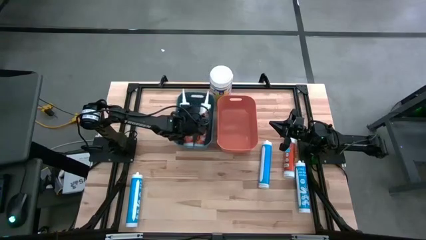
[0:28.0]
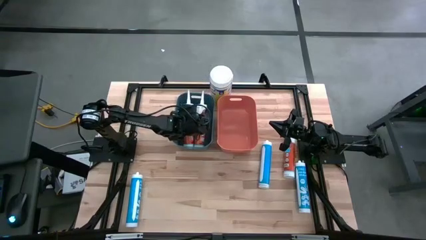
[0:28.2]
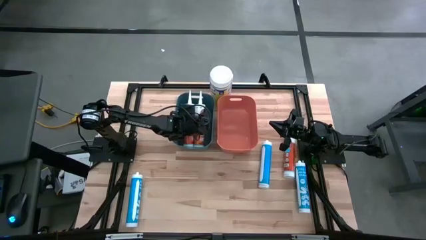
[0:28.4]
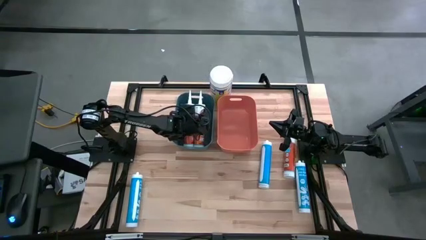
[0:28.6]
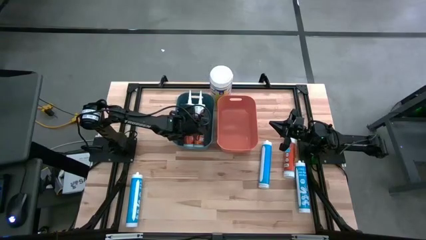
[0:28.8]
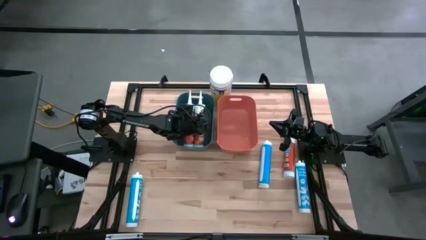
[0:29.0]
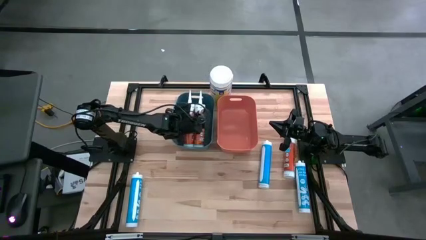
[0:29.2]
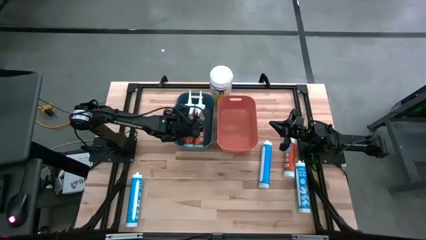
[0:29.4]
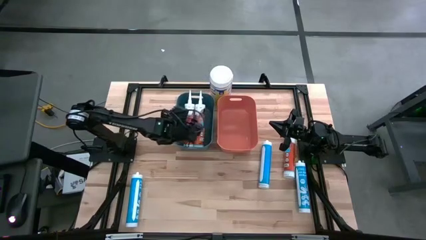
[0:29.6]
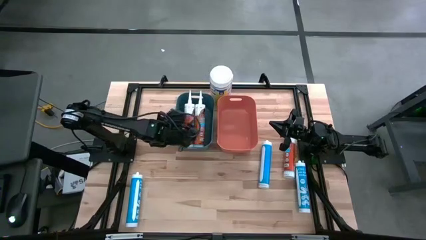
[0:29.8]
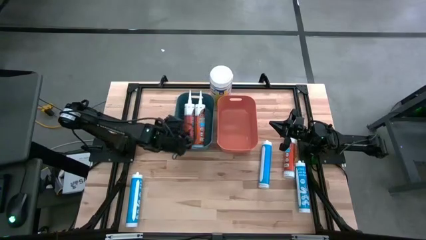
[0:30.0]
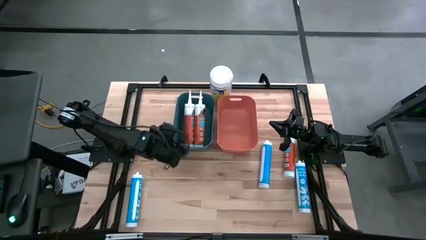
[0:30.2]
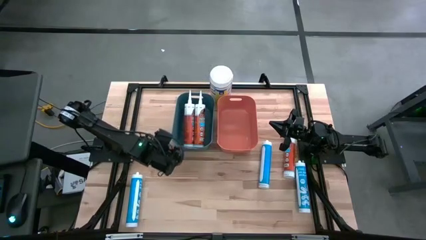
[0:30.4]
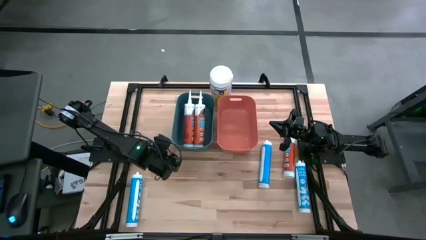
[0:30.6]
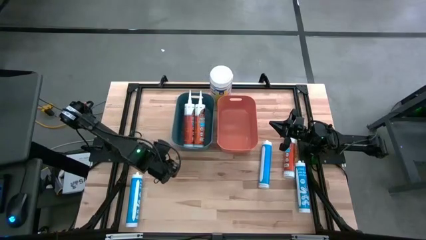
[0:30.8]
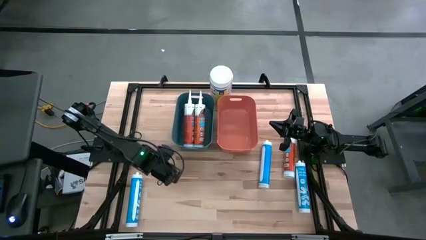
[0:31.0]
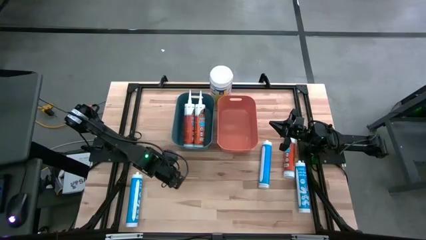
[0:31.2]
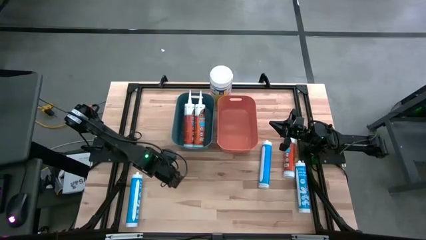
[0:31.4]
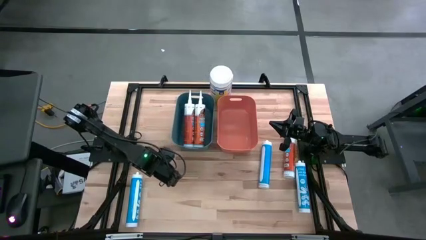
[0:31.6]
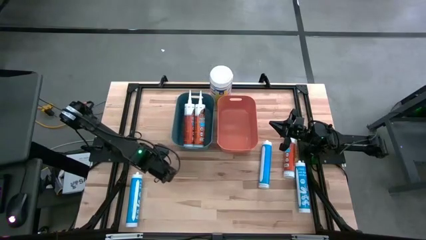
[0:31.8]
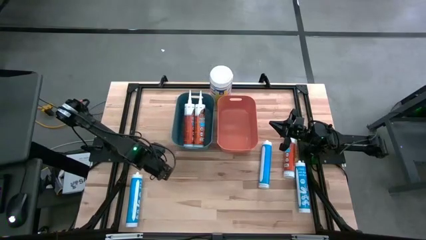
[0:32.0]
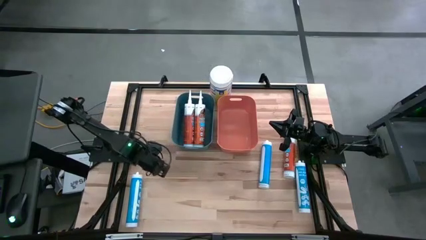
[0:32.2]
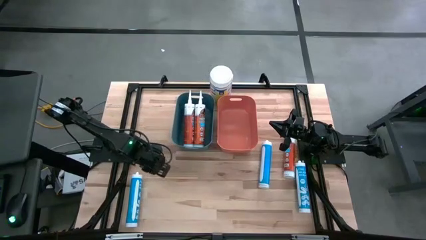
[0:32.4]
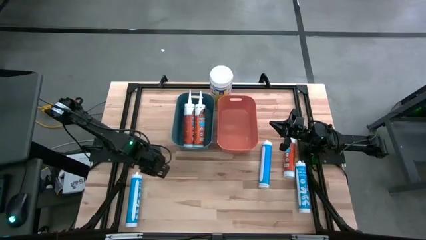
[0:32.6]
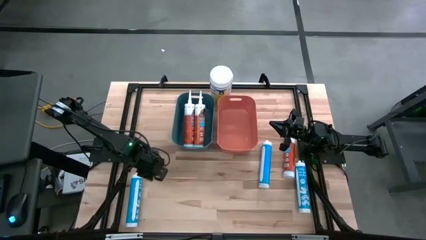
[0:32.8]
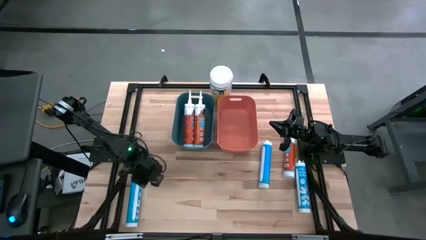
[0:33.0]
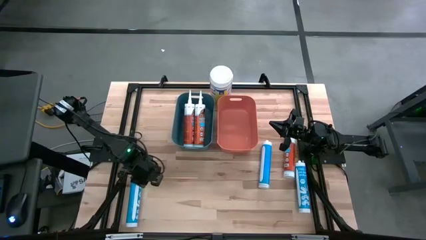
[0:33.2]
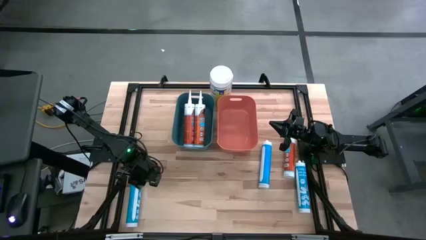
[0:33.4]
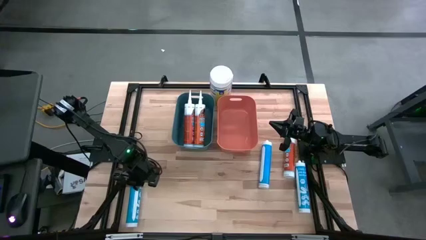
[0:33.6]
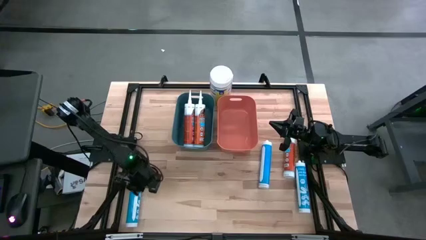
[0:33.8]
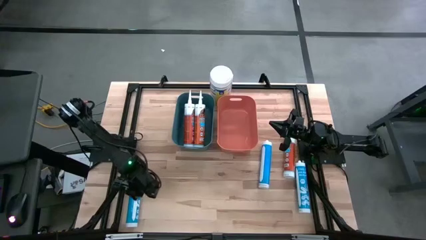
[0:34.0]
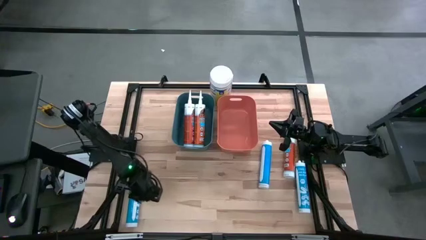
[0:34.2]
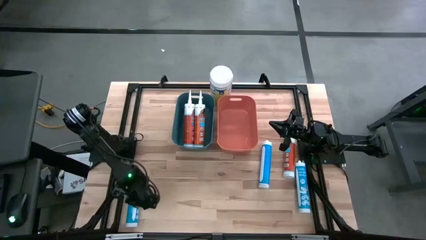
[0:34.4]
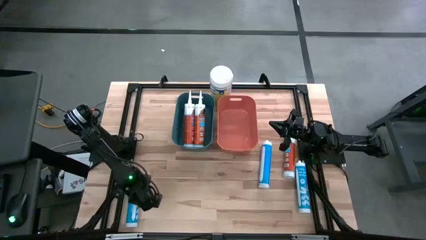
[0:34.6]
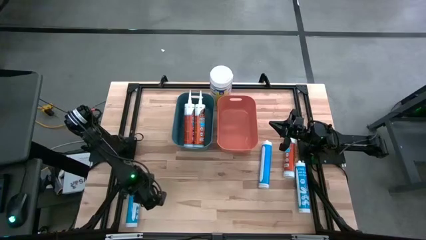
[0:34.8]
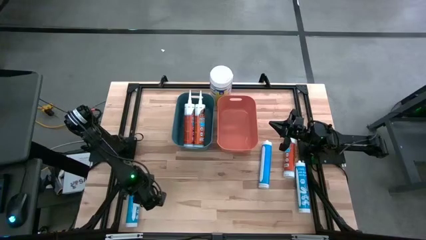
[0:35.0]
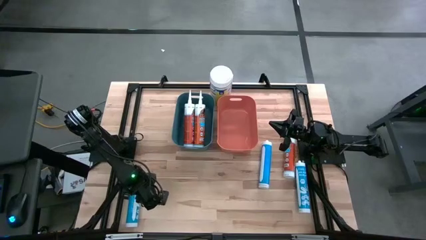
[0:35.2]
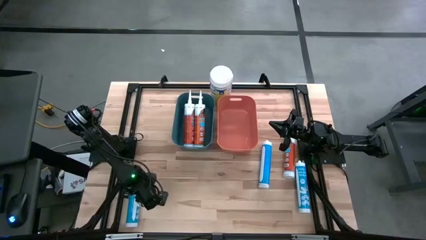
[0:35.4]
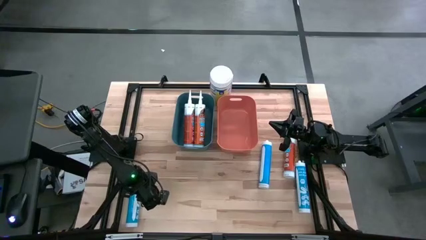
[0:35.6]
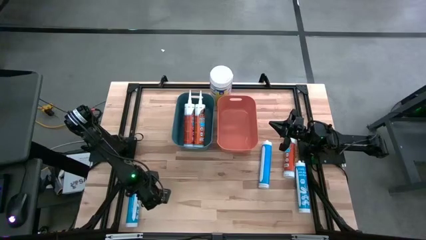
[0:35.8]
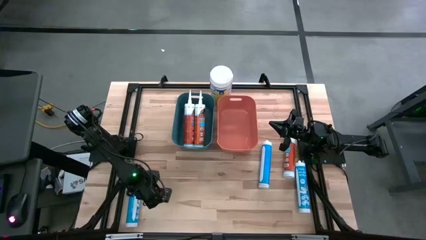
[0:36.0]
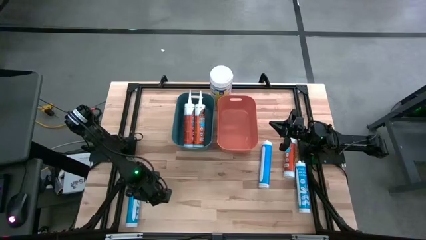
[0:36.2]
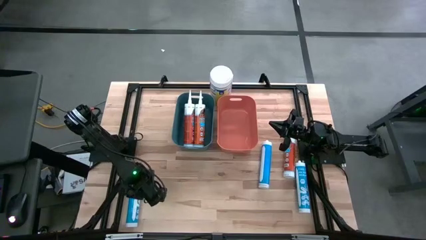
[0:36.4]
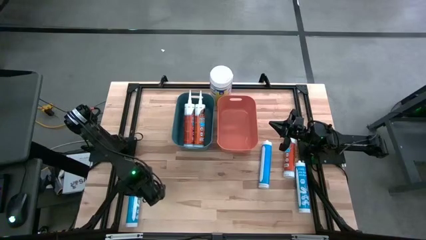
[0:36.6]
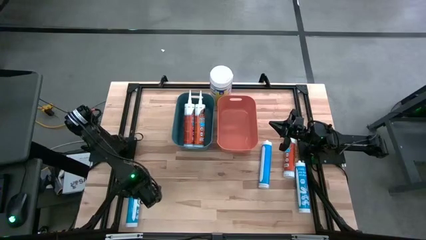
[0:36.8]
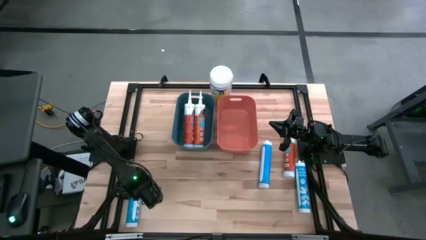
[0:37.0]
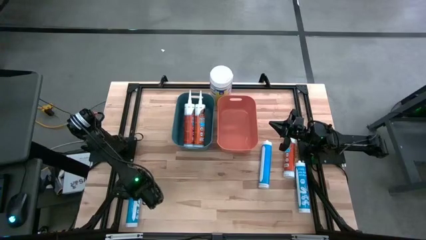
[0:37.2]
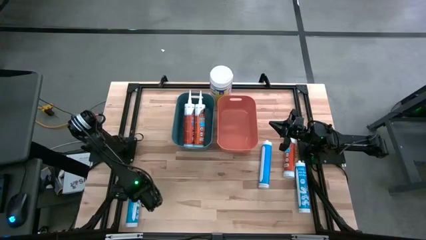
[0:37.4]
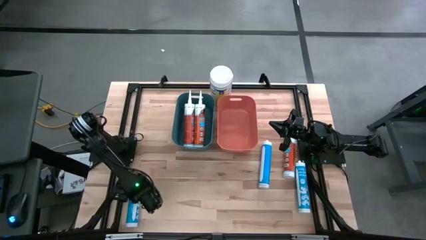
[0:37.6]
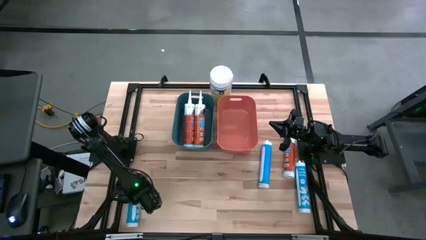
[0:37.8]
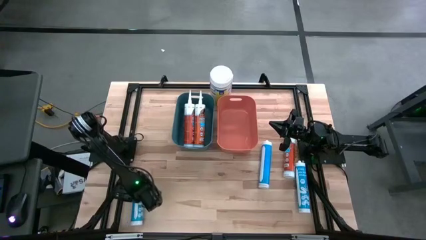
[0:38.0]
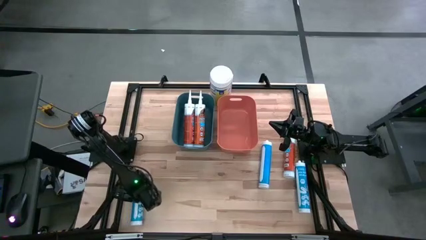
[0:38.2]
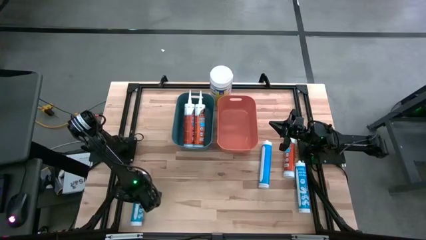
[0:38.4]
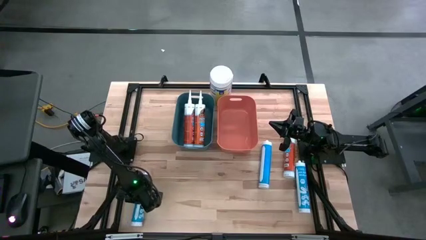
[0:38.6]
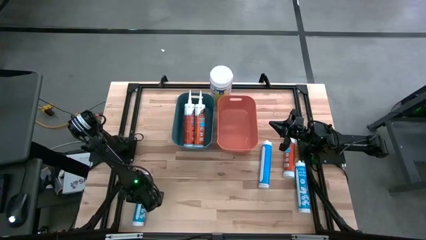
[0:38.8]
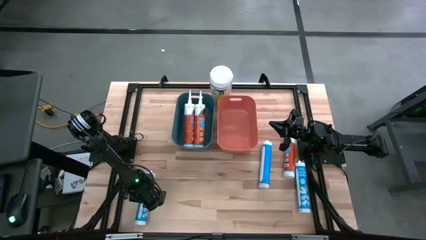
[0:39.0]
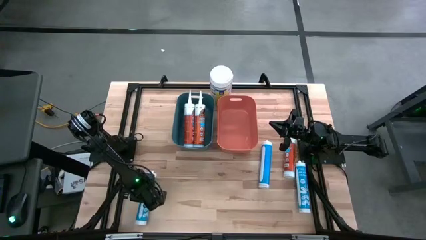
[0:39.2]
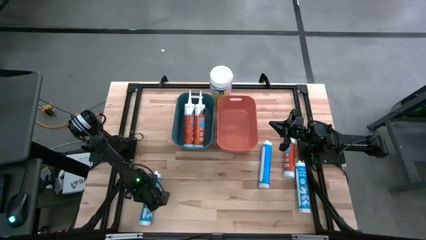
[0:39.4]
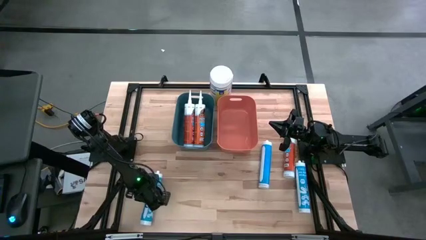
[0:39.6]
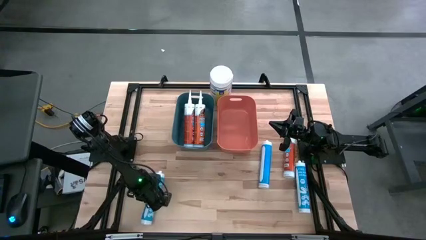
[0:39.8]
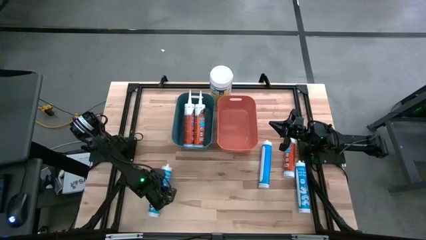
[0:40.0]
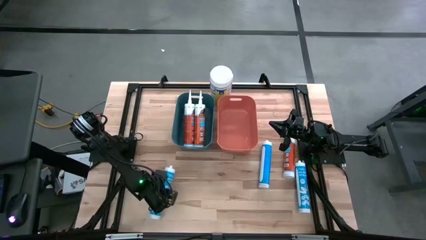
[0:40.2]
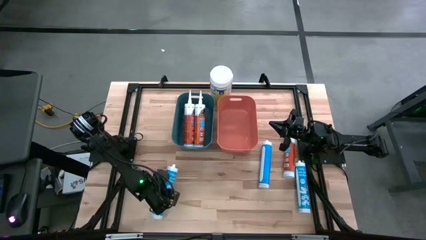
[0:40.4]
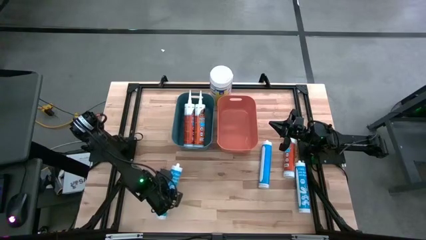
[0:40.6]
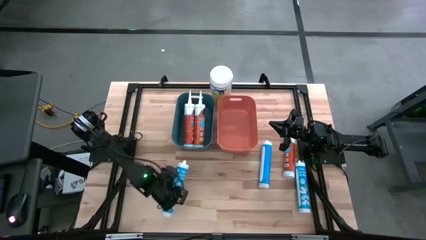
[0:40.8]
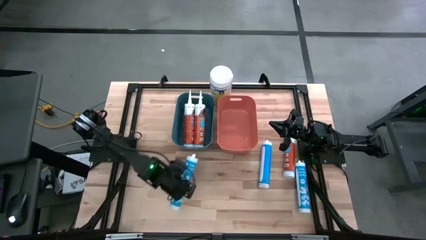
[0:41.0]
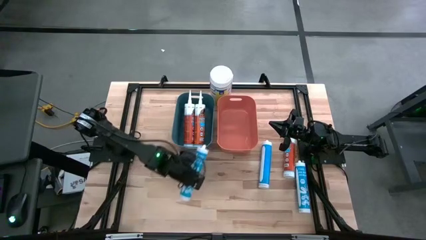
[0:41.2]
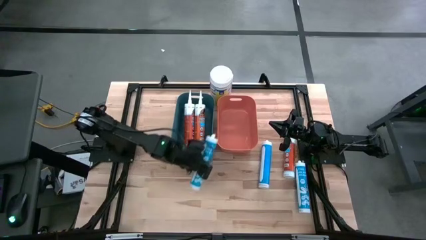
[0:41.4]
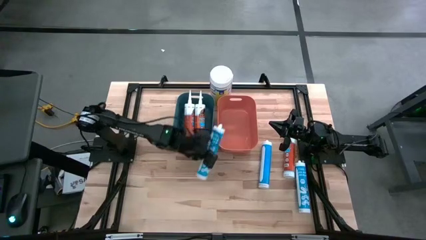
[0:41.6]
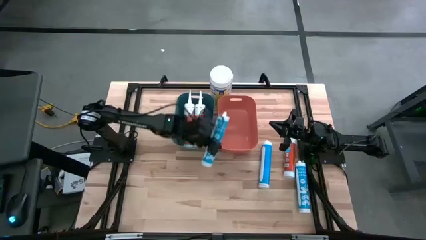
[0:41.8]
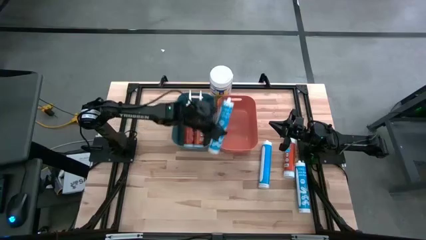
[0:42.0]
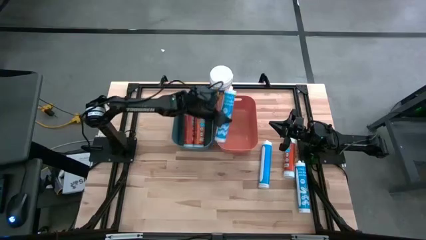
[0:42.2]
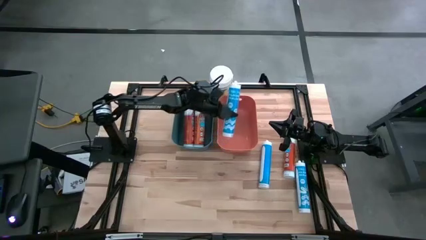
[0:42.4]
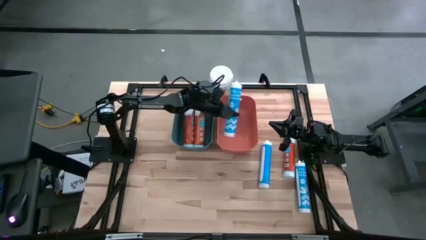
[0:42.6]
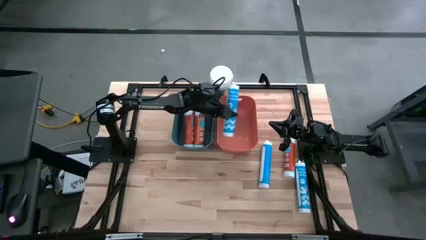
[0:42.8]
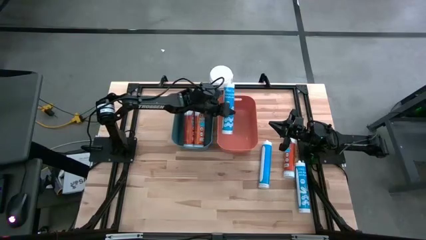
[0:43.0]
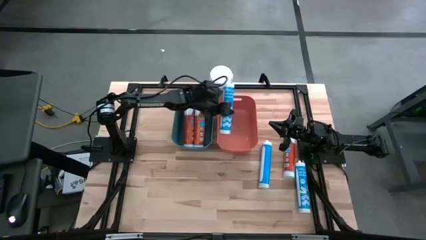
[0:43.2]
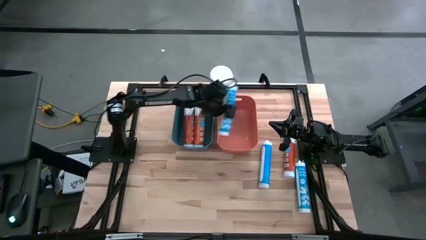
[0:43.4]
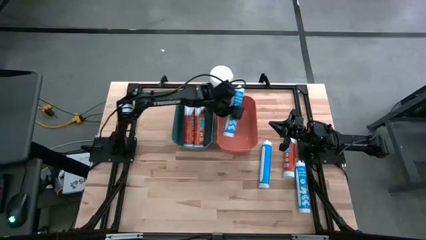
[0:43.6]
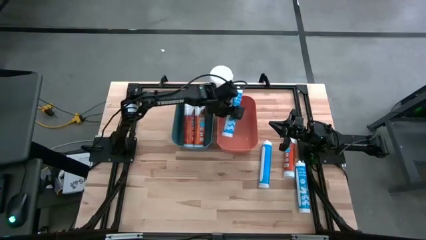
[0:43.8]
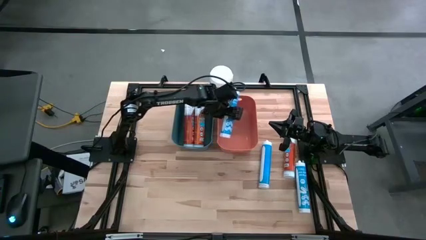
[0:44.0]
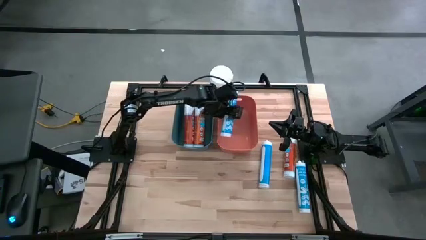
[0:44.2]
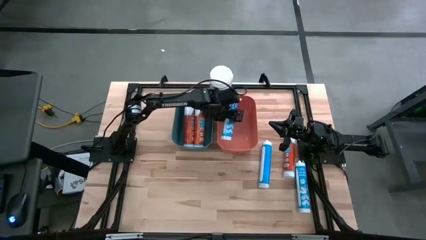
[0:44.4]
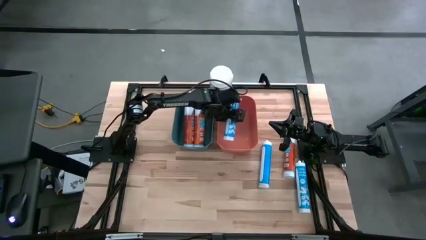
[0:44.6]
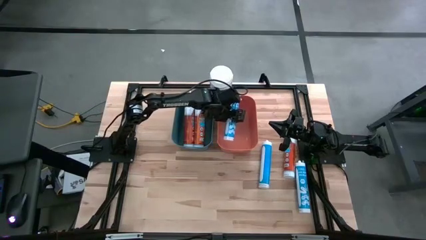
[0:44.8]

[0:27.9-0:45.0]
Task: Pick & place silicon tubes, Sealant and Lysol wipes
Put the bottom left blue sealant into the orange bin
